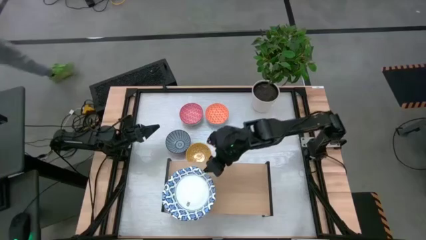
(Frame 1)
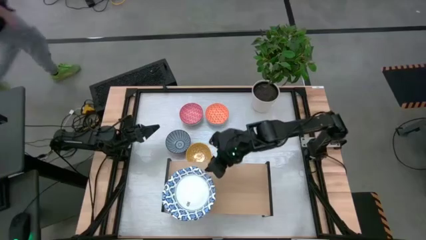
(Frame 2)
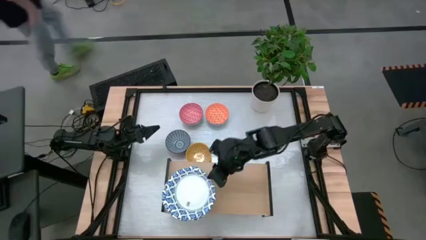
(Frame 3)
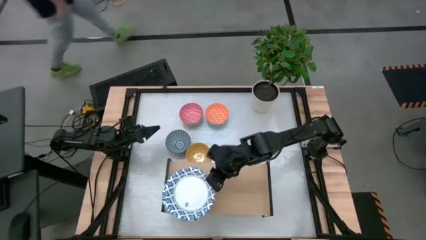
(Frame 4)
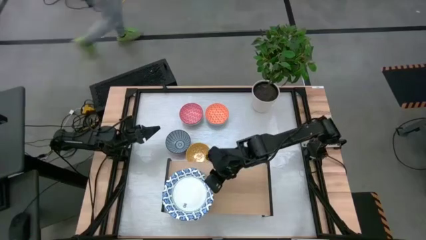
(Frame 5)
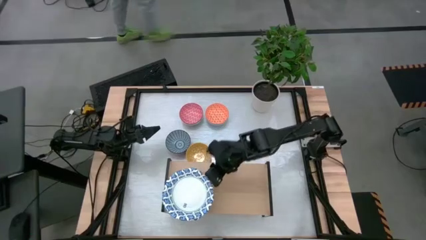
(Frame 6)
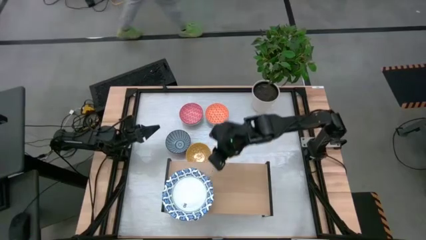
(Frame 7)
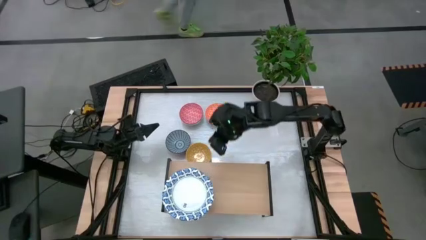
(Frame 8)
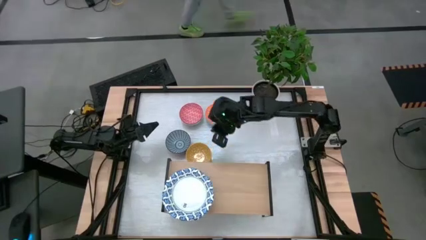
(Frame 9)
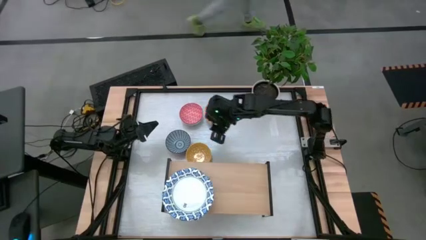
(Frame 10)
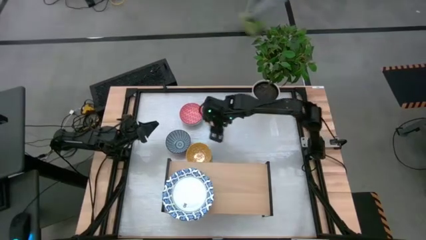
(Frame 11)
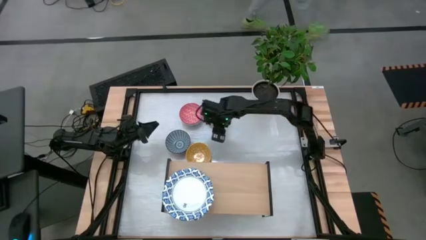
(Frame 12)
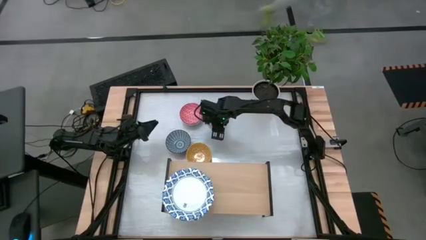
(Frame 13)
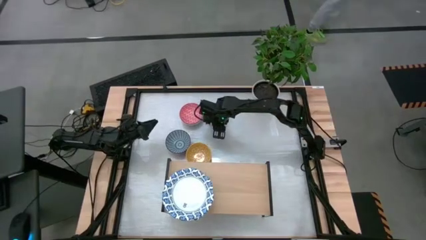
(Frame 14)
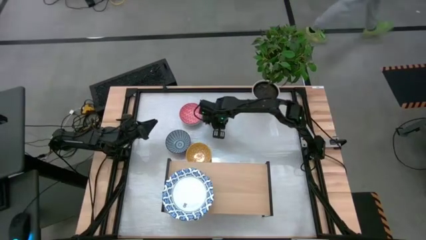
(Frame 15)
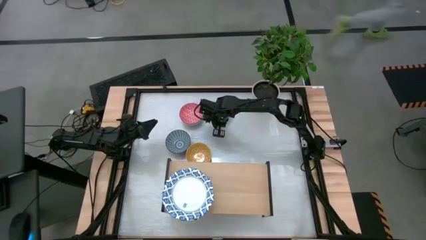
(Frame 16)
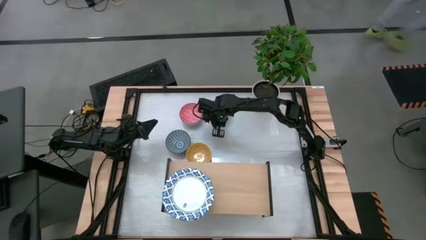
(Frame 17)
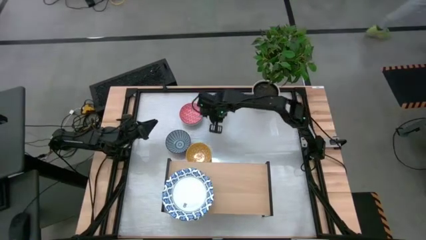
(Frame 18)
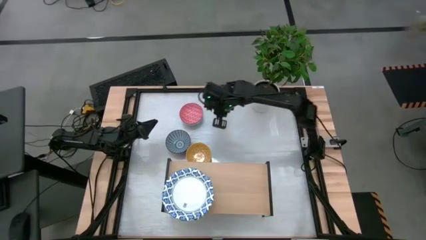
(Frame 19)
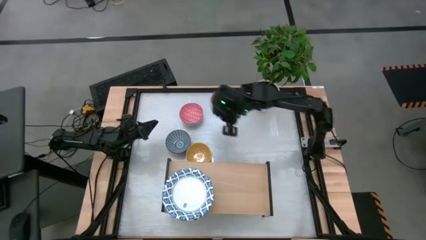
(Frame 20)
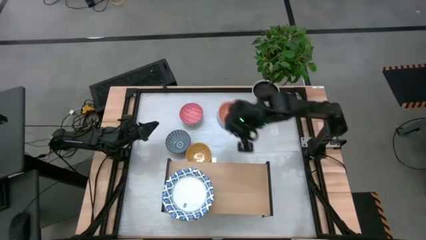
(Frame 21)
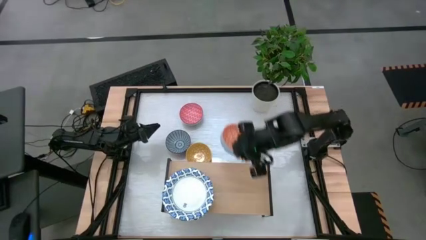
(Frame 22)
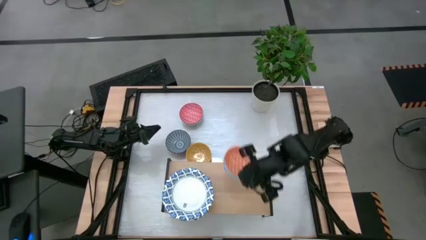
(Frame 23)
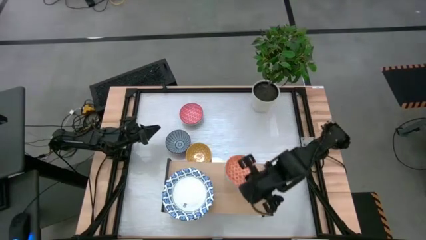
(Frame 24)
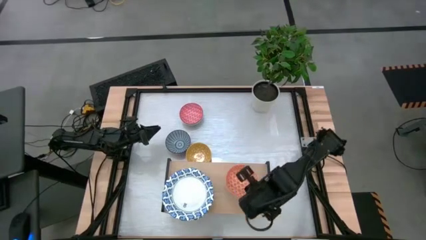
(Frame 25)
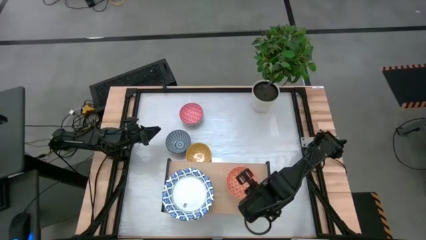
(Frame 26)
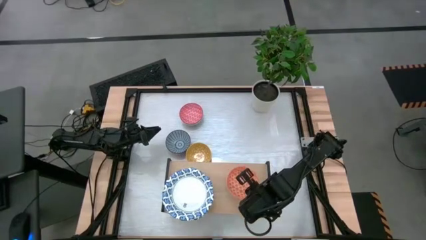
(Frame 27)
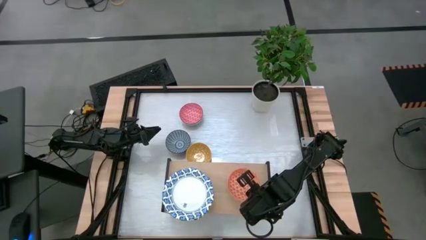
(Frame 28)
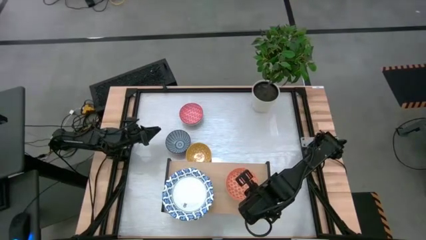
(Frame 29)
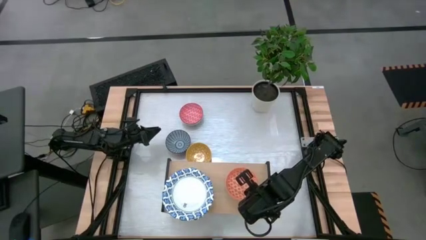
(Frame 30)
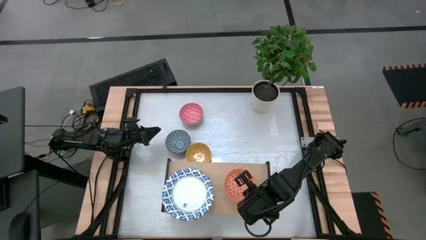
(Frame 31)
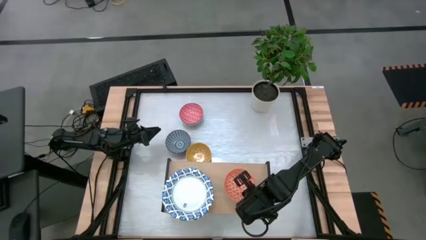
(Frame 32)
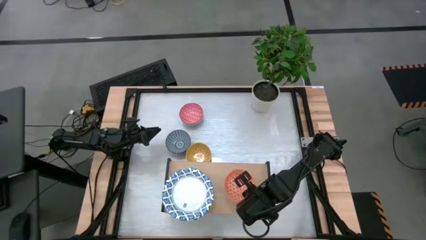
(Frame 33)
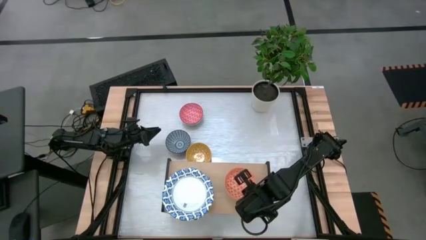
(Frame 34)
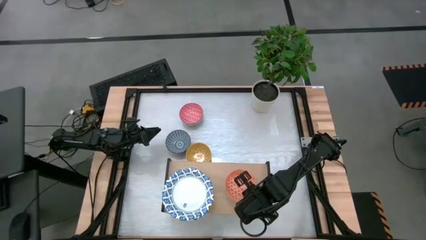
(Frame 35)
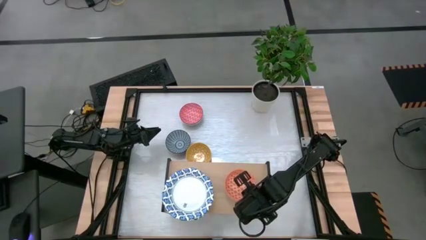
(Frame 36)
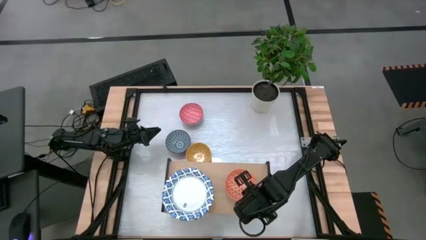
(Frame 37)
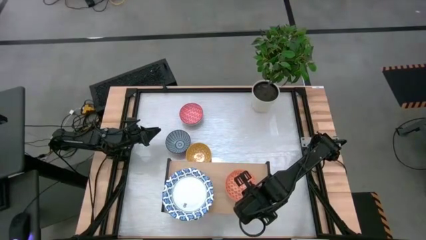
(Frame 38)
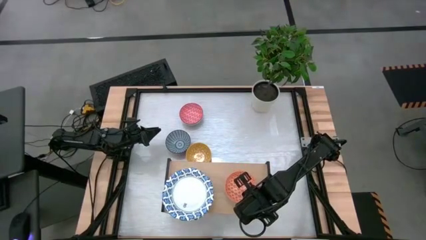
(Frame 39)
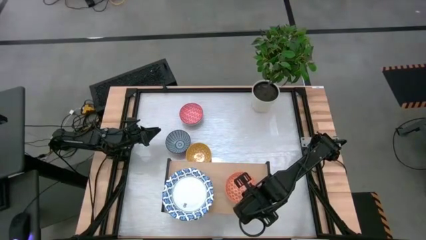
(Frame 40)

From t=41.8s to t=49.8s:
Task: Place and stack bowls onto a shelf
Put the orange patterned bowl on the shelf

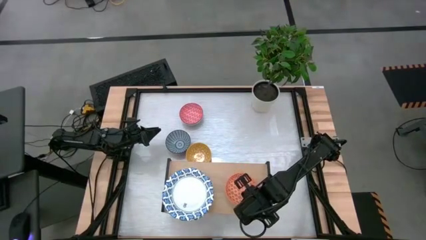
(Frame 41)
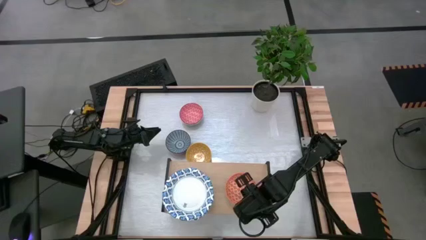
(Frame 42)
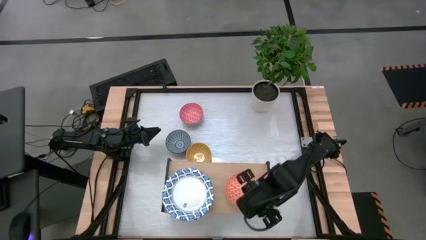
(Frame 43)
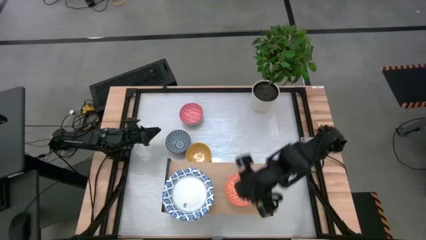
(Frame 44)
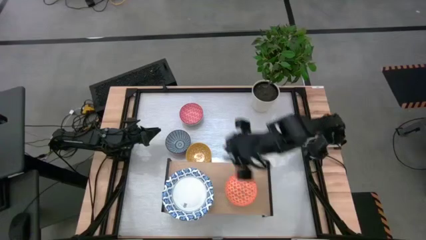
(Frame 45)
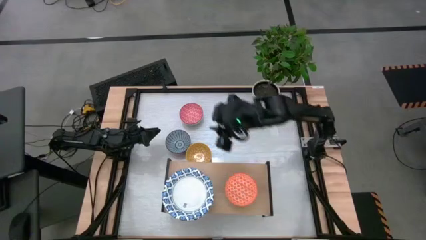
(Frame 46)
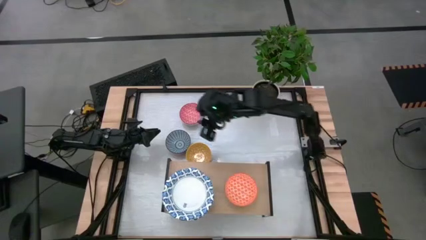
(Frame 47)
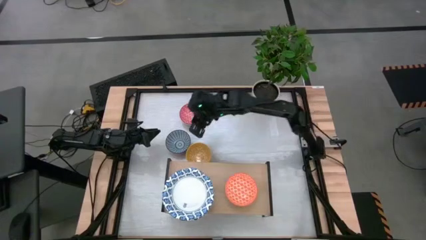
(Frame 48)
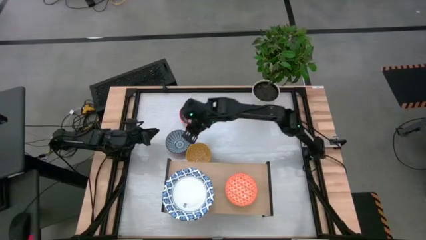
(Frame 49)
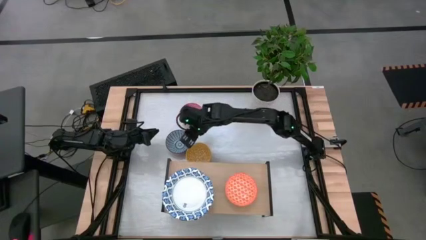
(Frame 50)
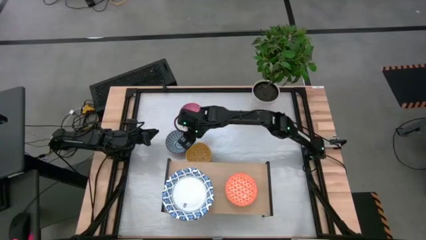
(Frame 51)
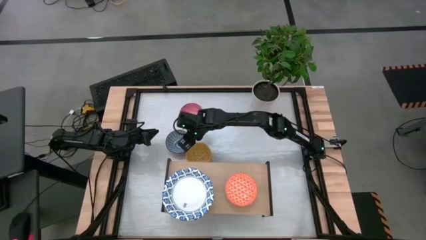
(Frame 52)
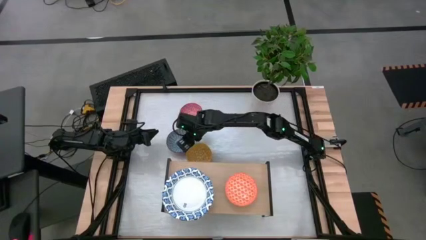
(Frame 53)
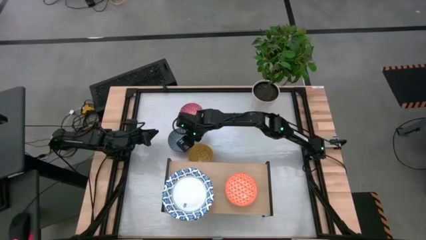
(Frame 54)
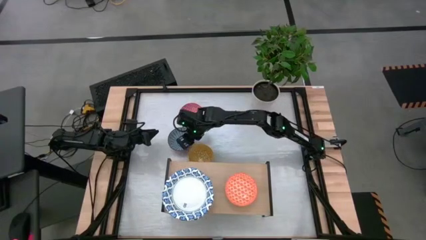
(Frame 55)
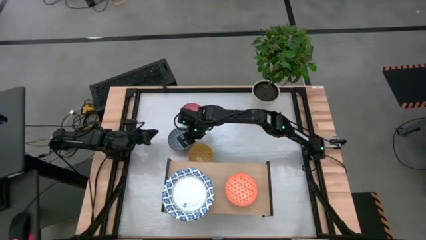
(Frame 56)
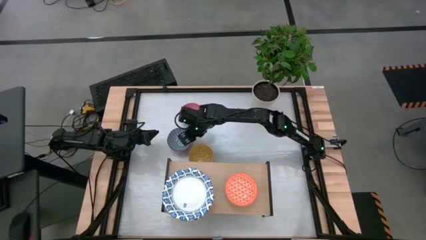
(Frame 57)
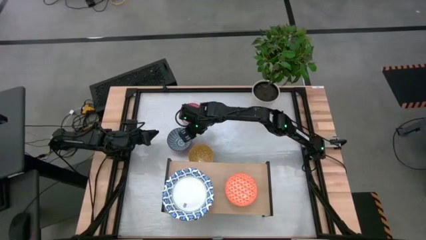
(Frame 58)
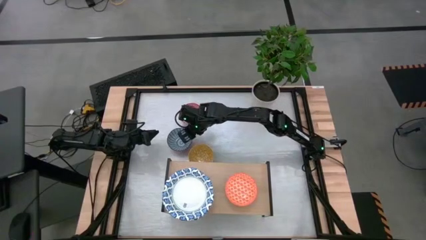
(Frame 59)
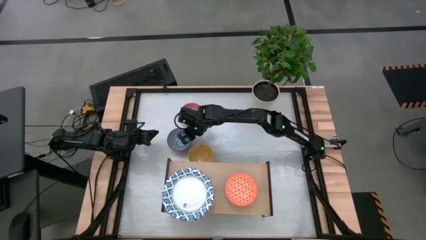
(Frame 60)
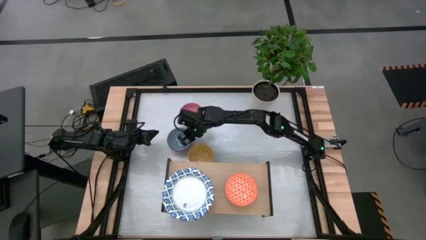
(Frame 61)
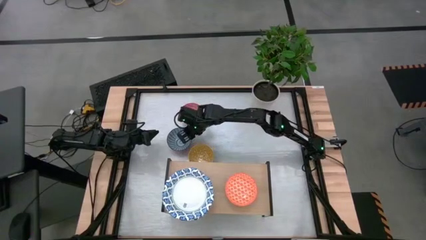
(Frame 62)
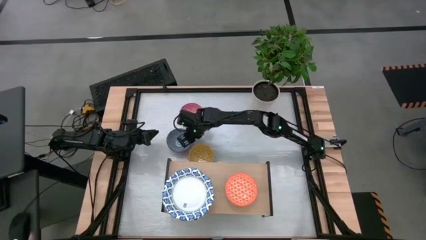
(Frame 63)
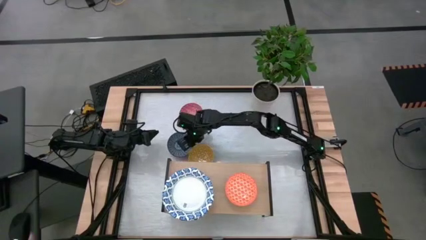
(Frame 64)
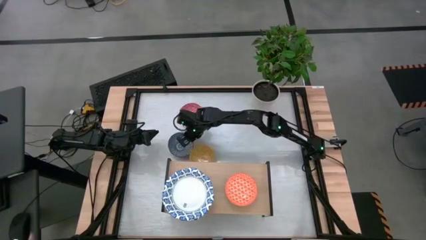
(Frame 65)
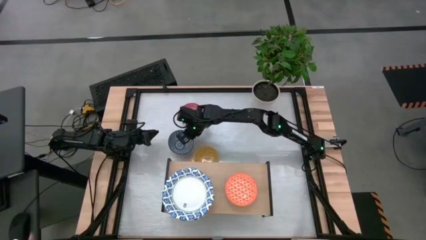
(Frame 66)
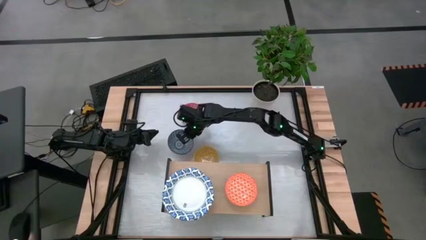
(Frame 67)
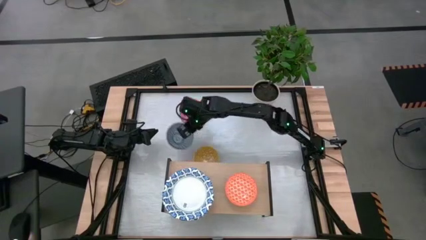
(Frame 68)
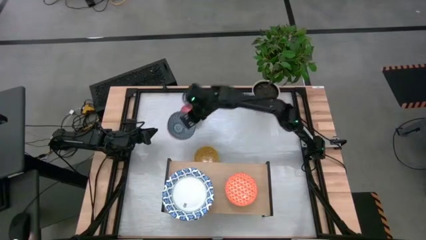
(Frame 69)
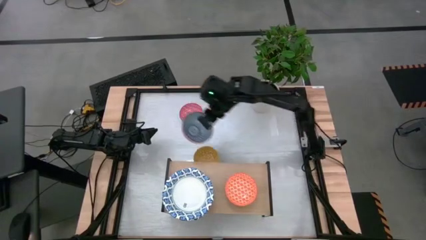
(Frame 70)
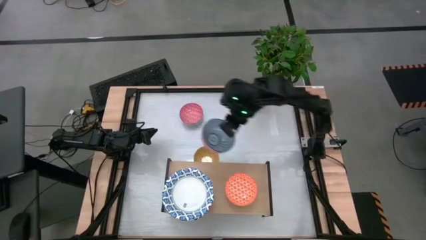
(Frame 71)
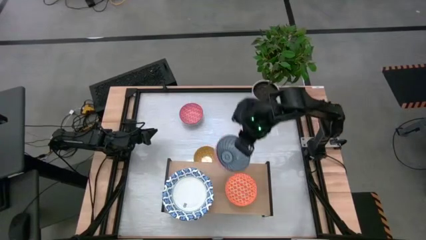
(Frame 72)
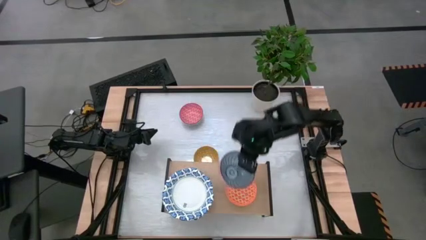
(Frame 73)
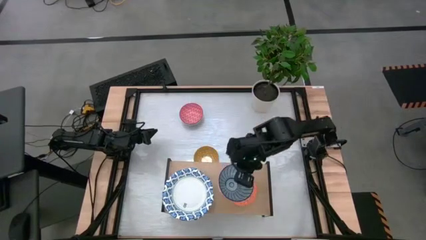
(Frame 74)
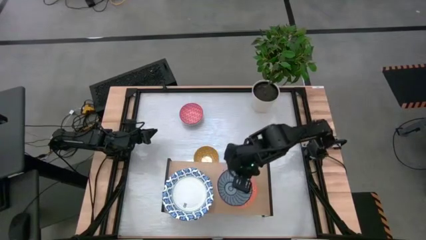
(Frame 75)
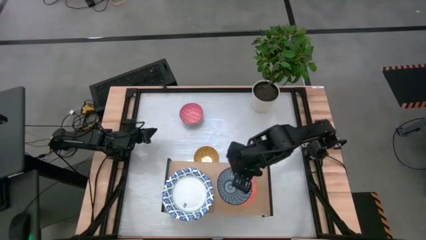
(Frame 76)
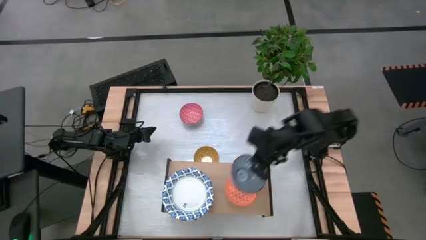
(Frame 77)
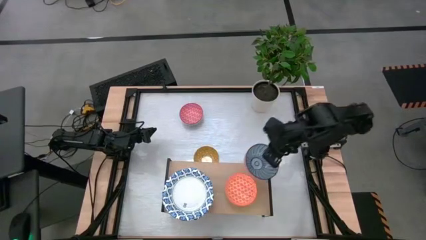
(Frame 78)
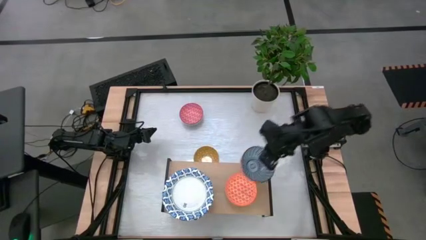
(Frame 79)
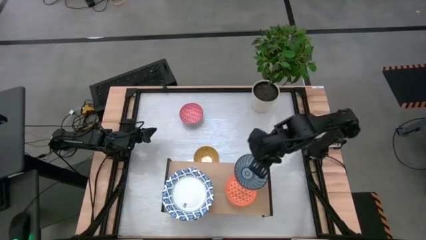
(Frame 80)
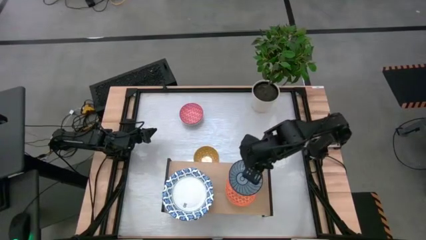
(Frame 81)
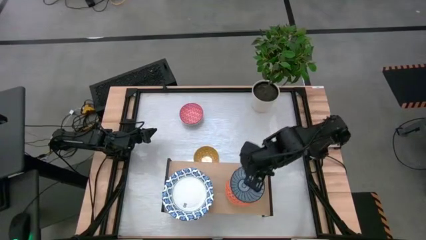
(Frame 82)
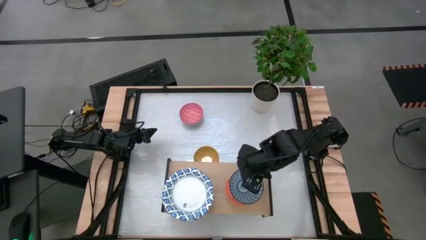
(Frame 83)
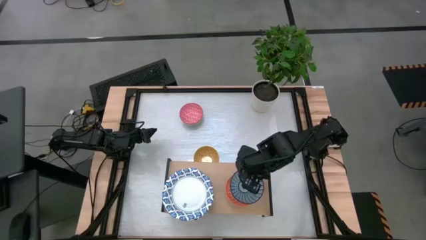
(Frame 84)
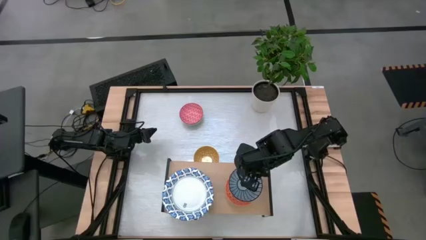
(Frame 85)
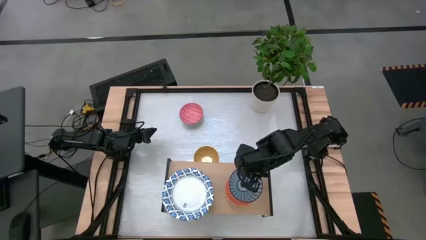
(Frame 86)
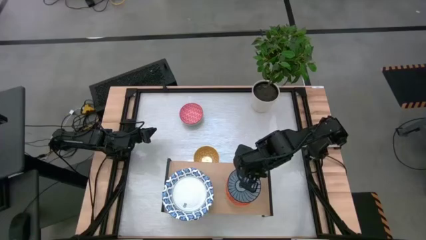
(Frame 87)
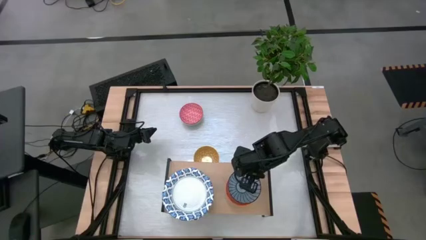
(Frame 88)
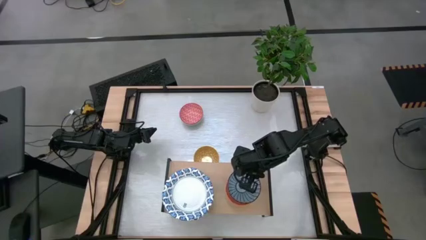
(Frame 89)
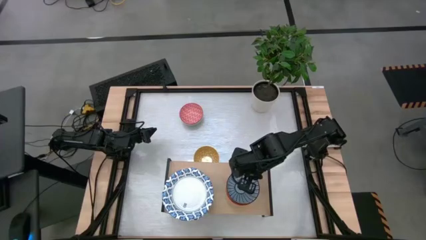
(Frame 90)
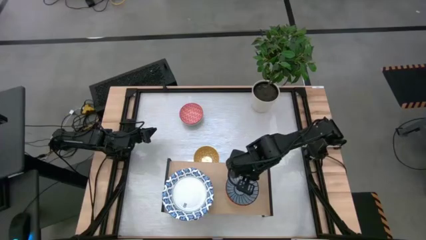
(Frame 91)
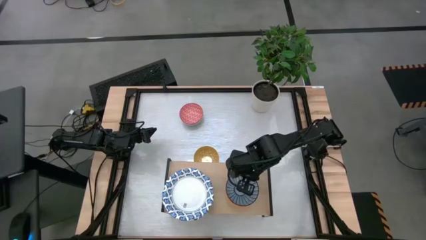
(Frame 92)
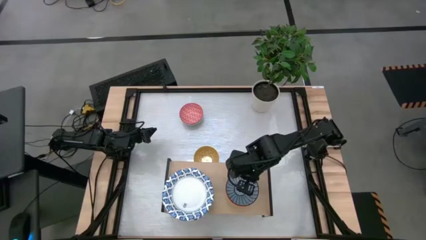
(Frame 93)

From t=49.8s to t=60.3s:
Stack the blue patterned bowl on top of the orange patterned bowl on the shelf
